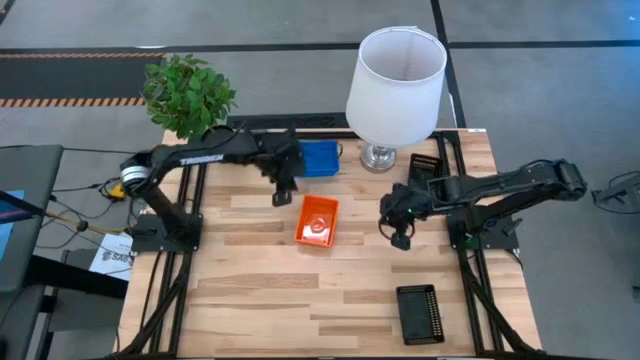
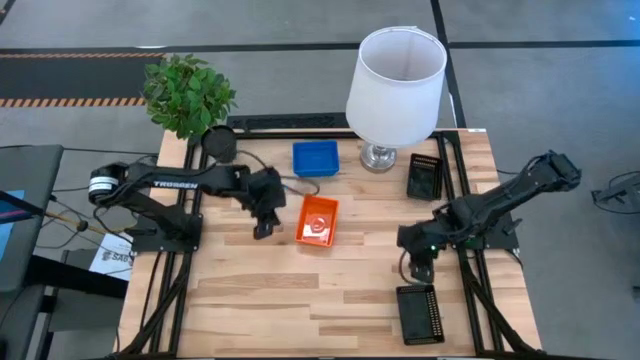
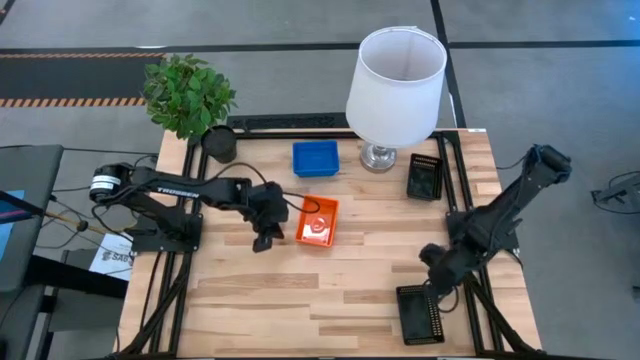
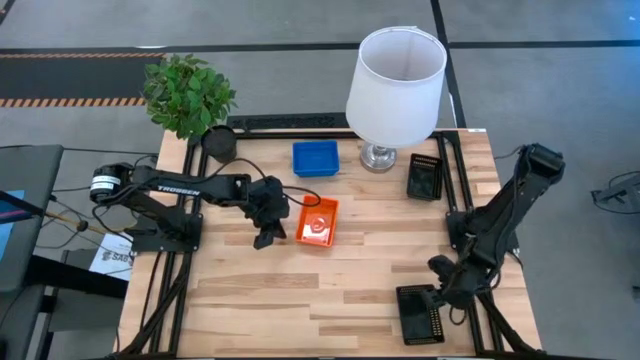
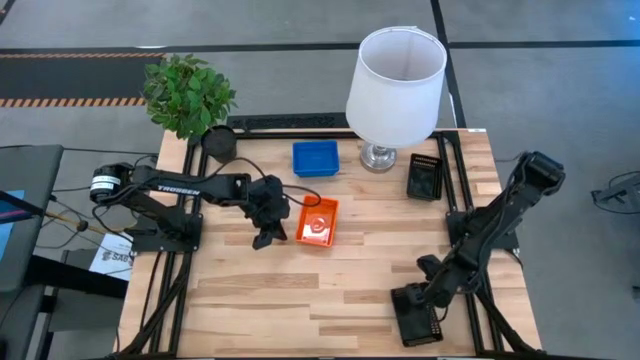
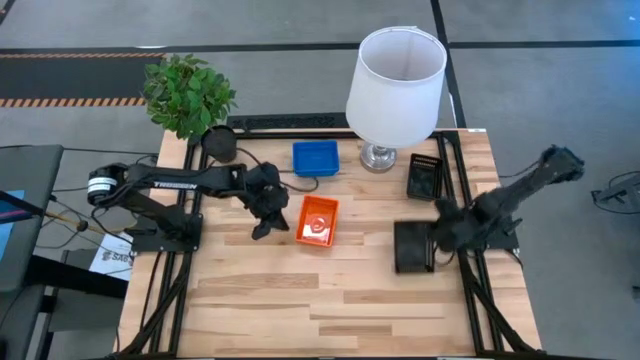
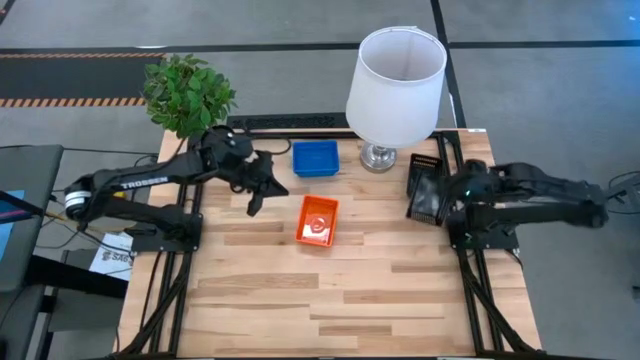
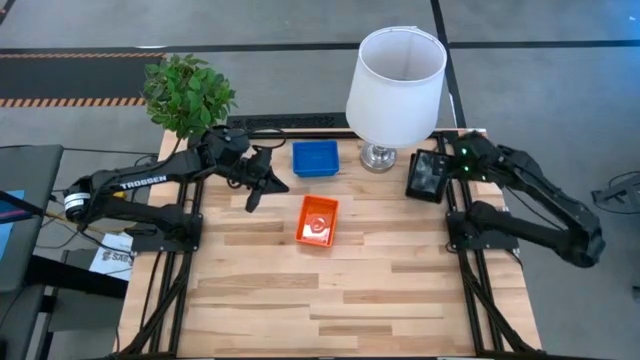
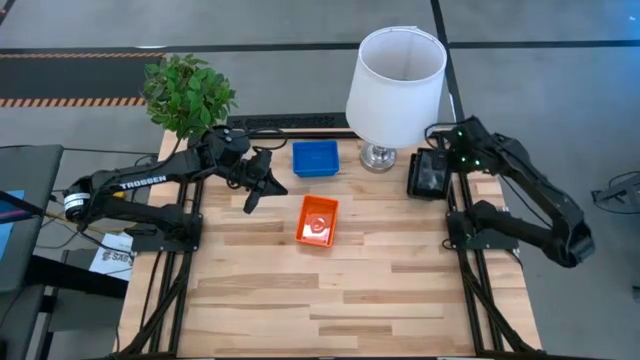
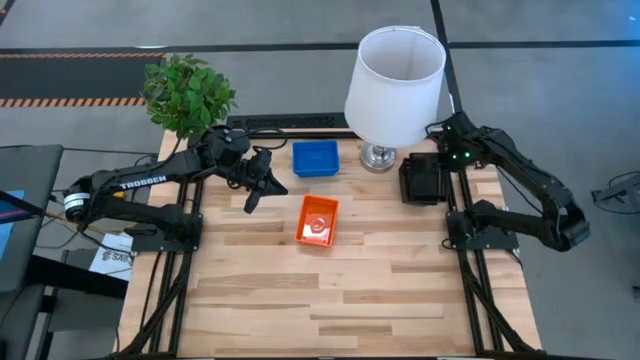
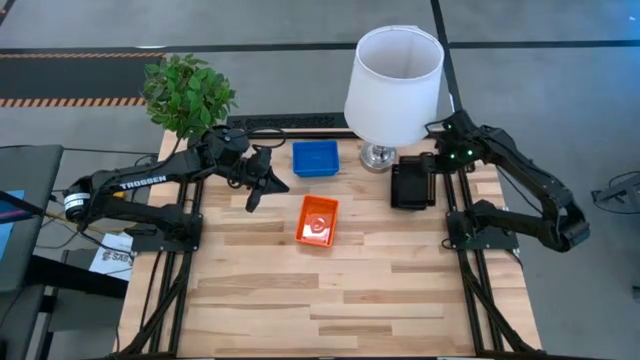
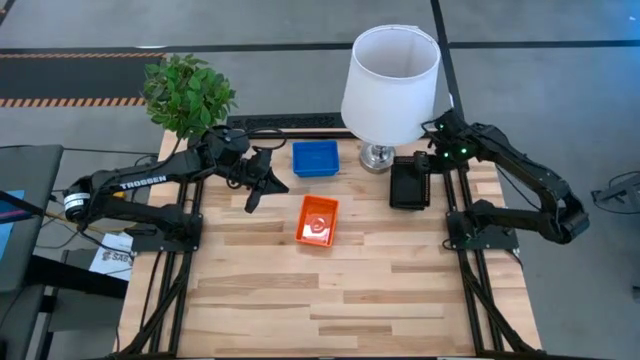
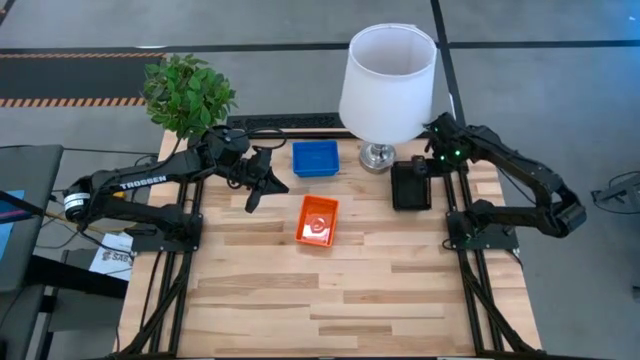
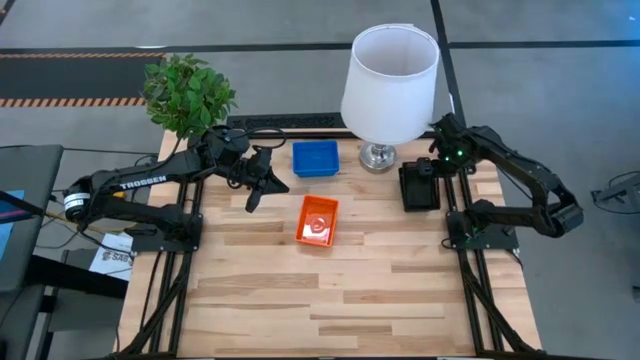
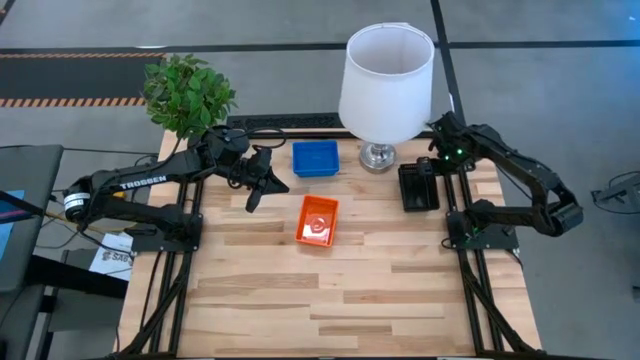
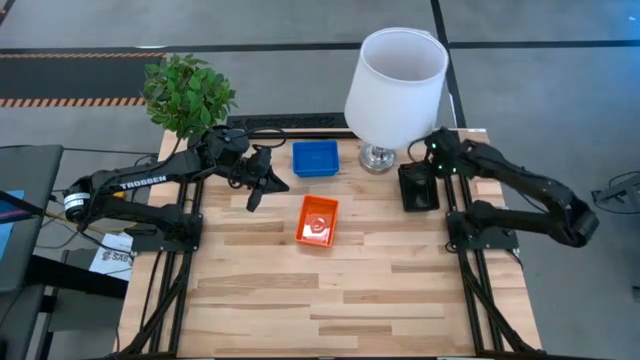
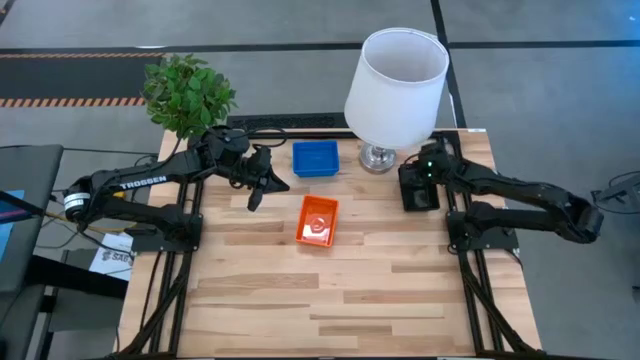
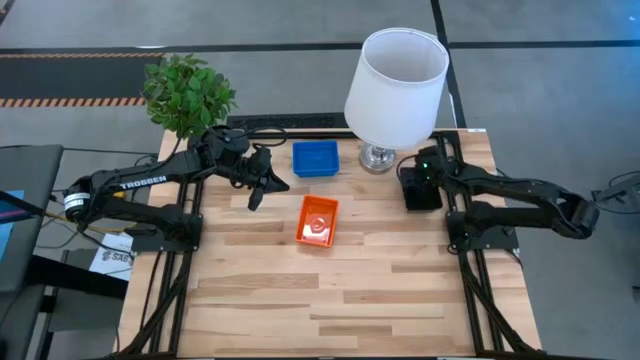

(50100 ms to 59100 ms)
Stack the bottom black bin on top of the top black bin

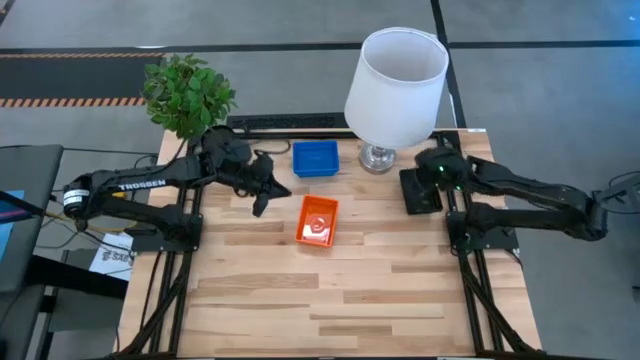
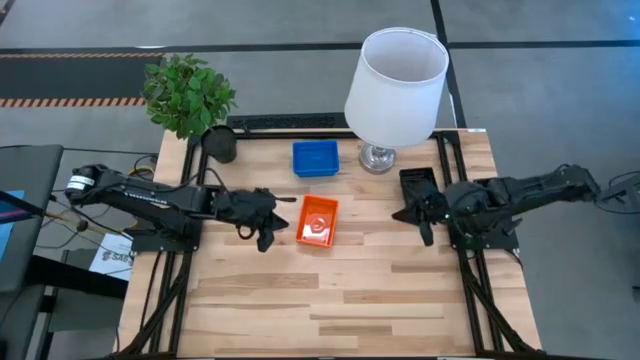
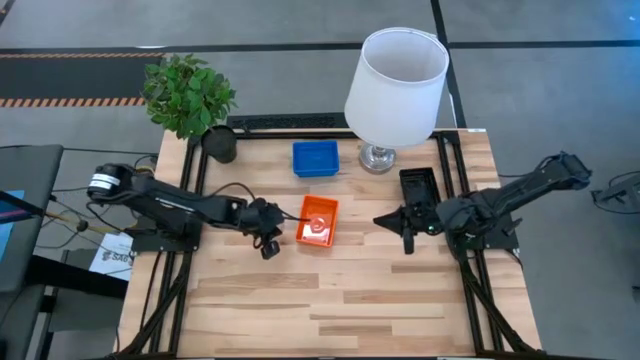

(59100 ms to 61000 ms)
Adjust the orange bin on the table

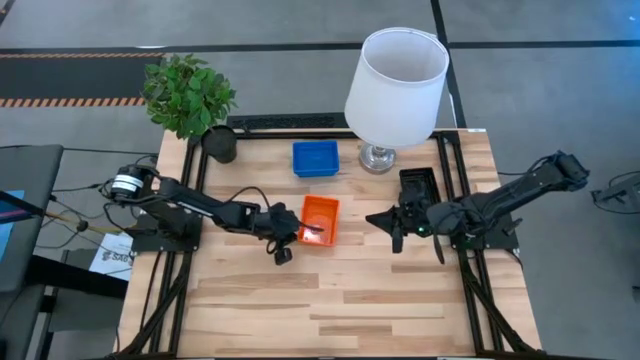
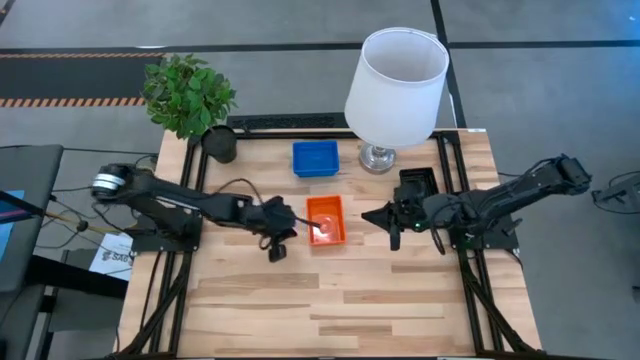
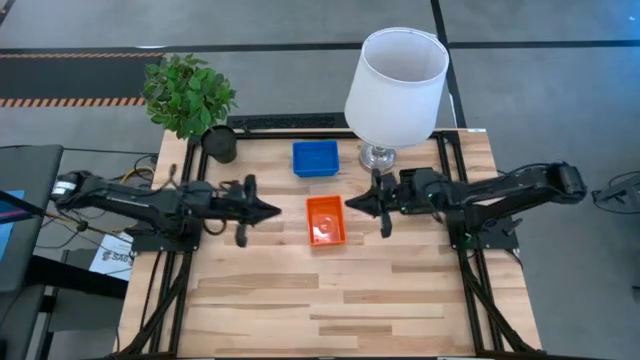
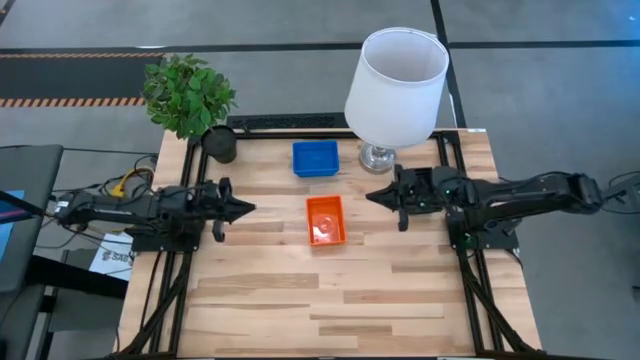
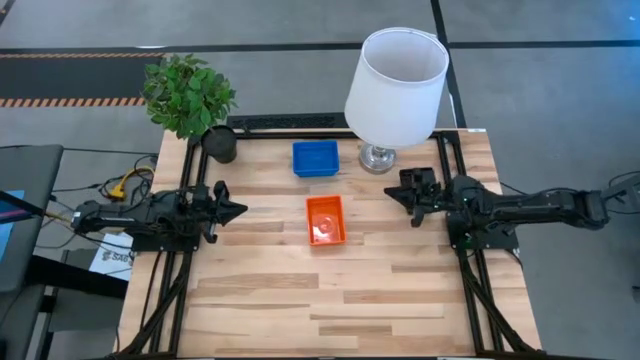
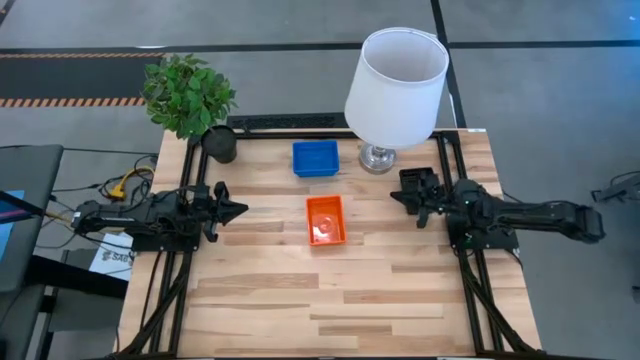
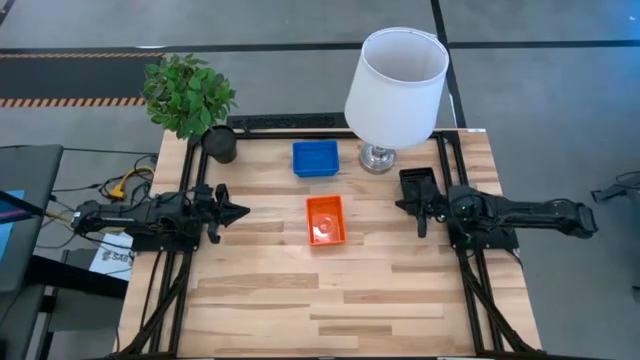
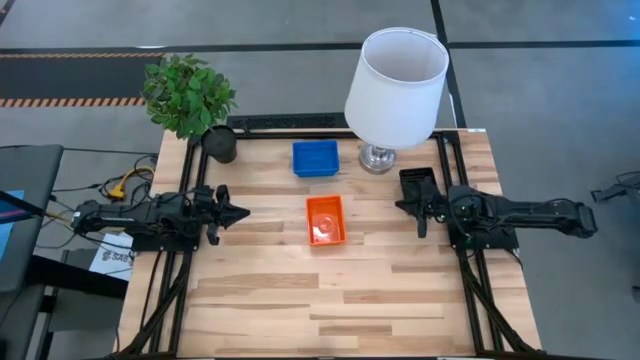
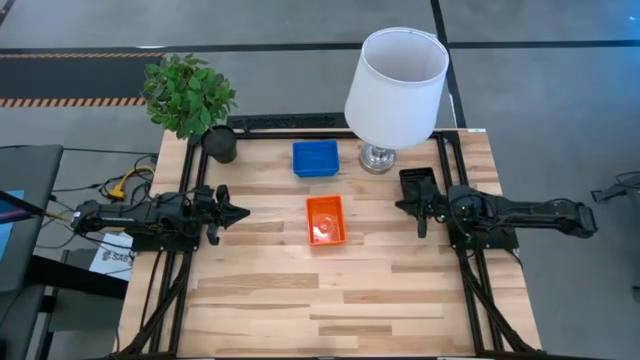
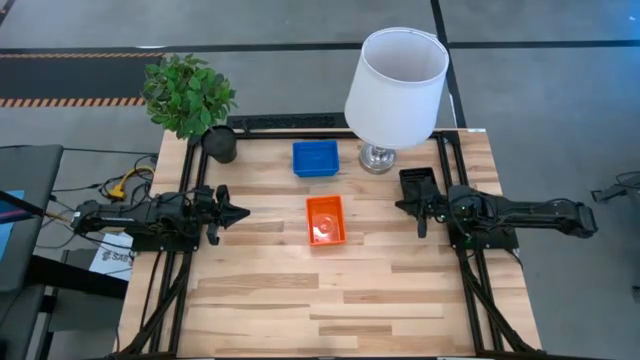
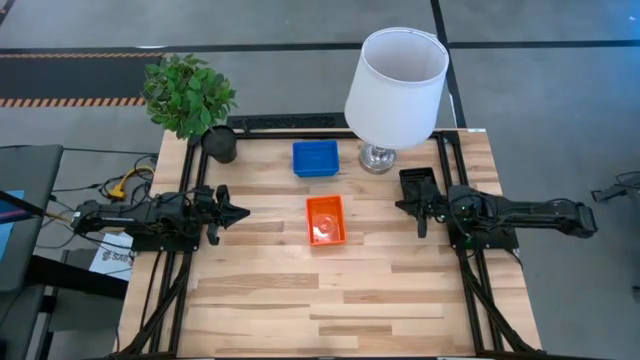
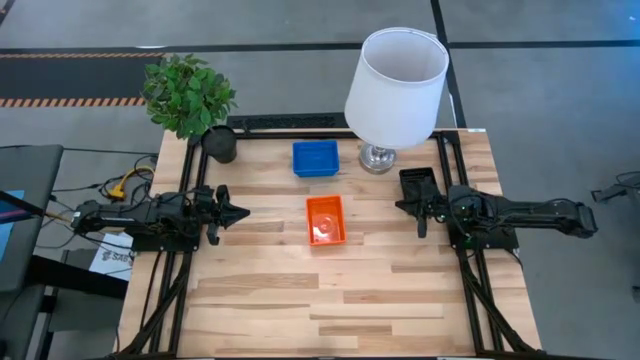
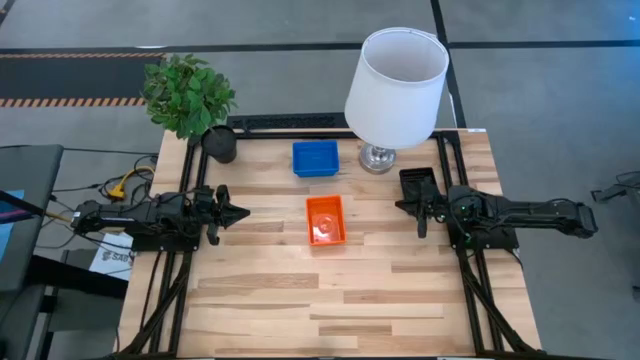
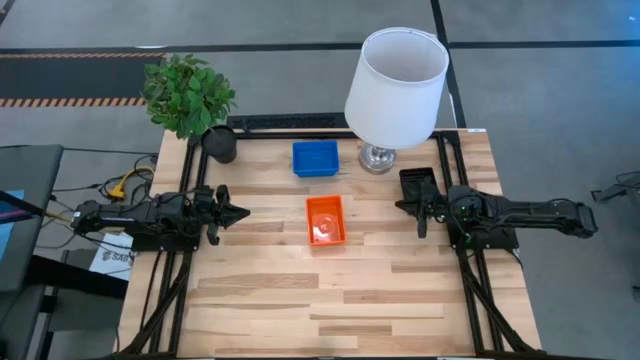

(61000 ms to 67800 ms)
Return to Home Position
